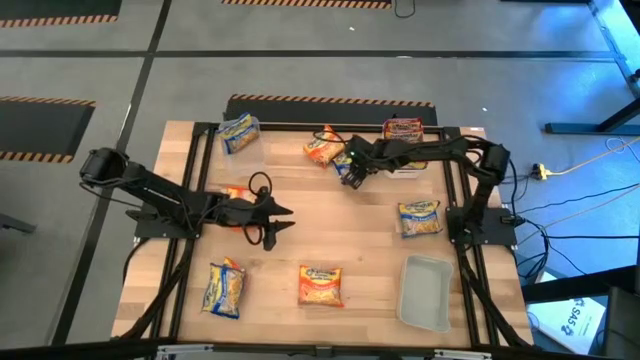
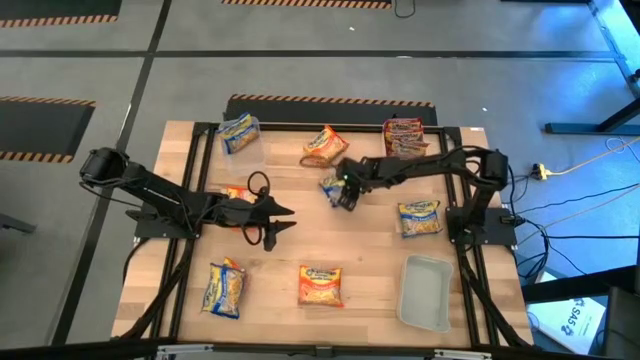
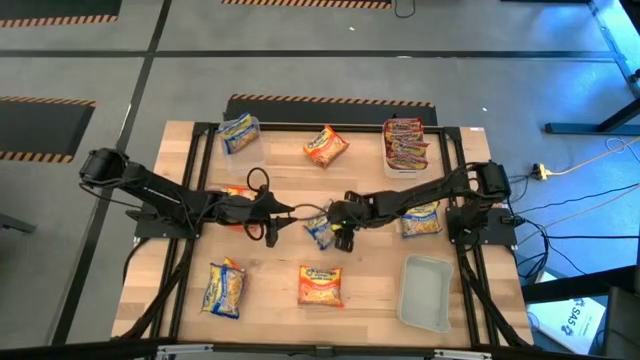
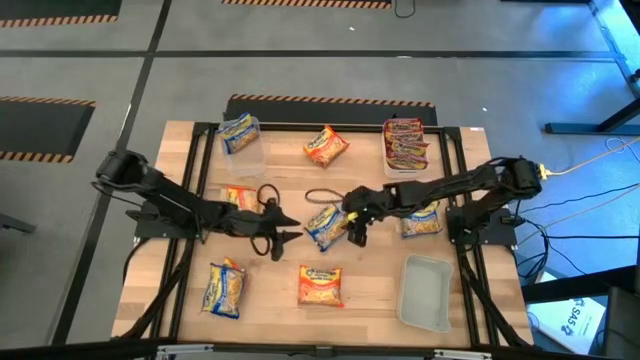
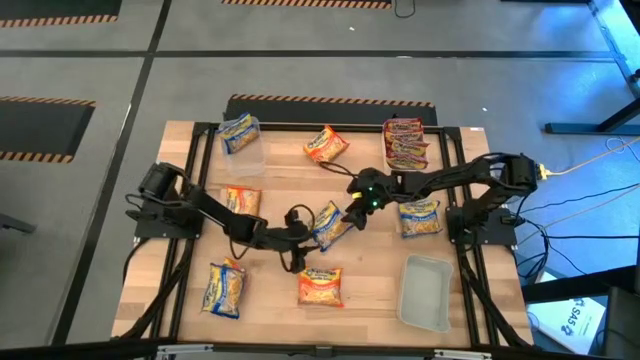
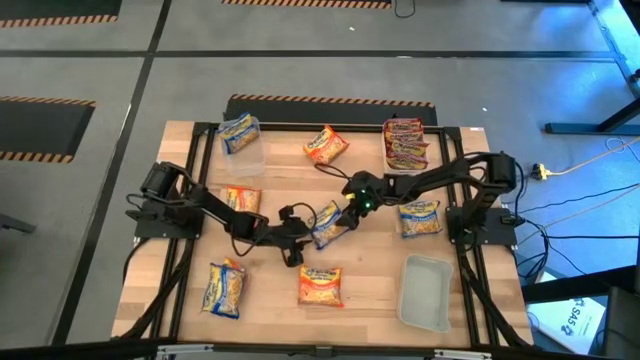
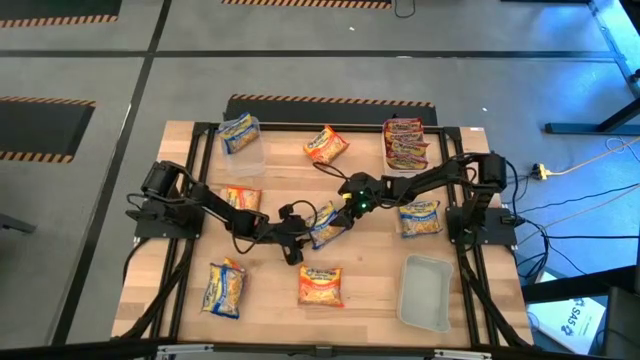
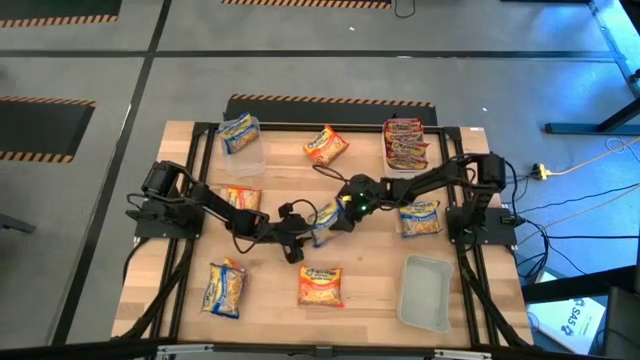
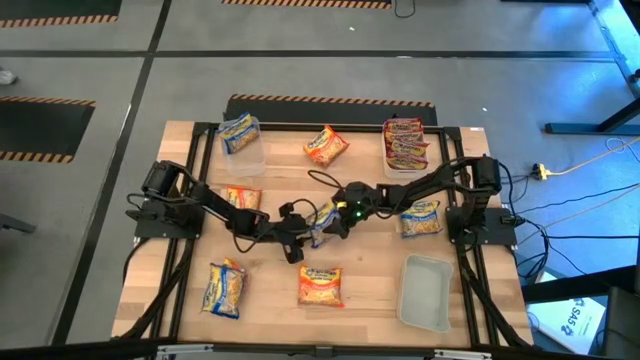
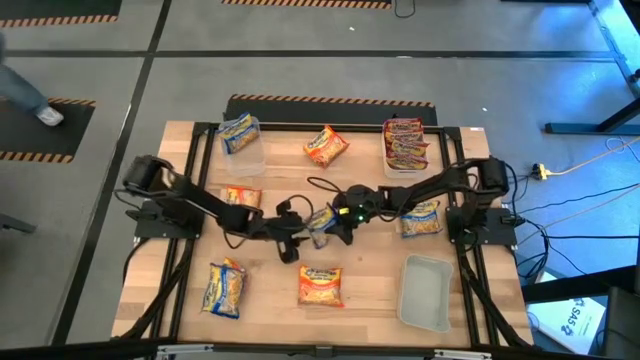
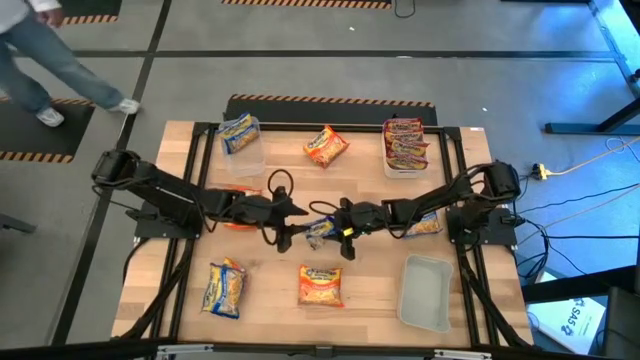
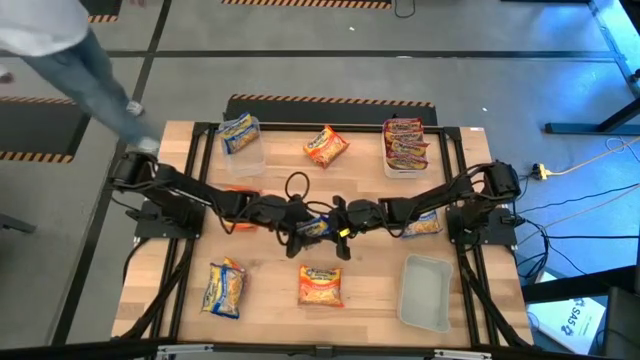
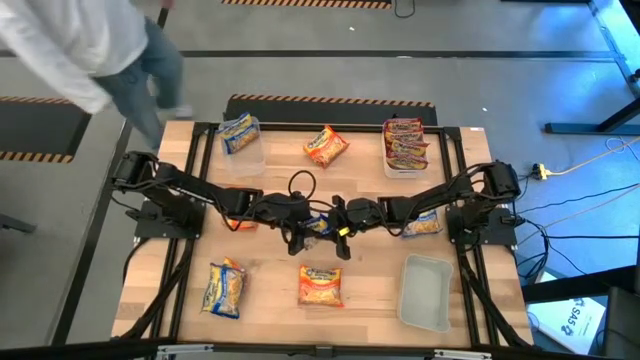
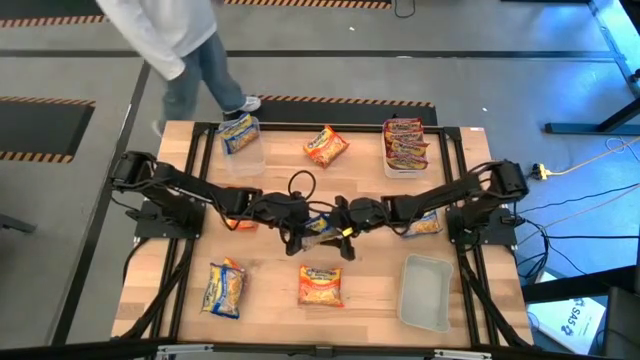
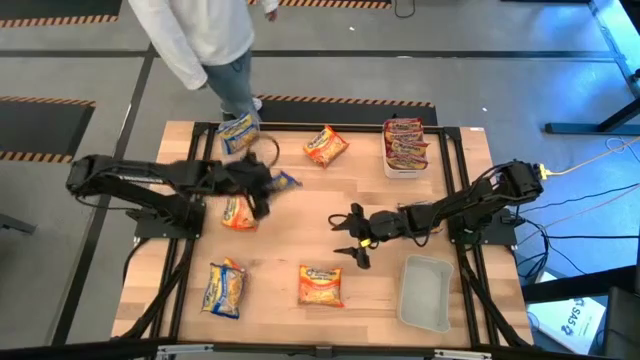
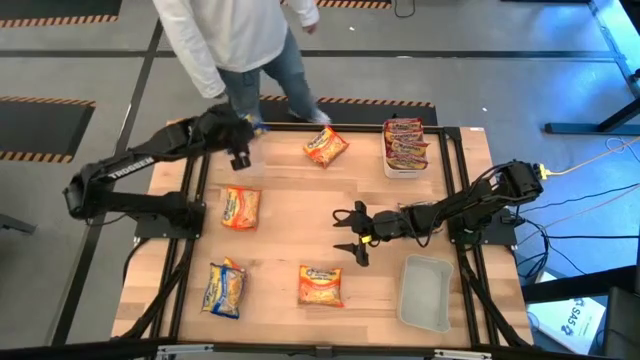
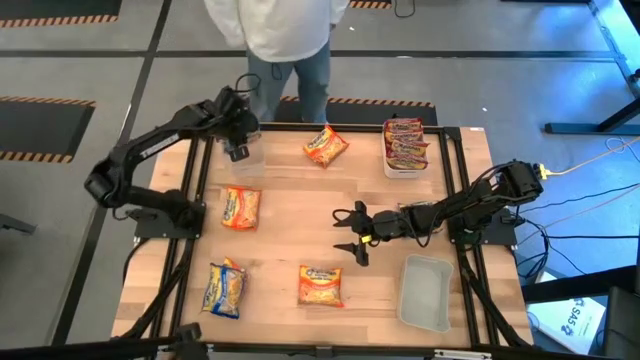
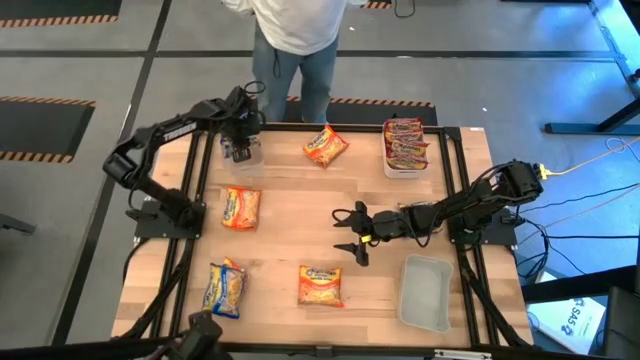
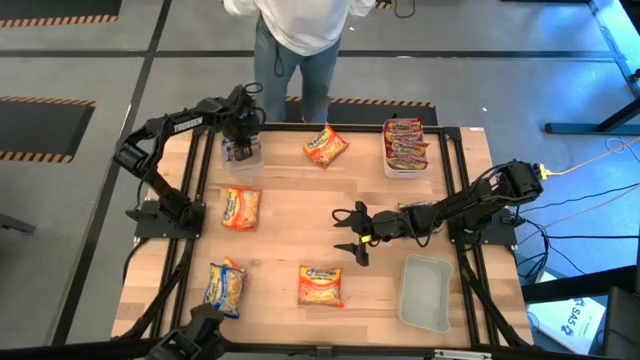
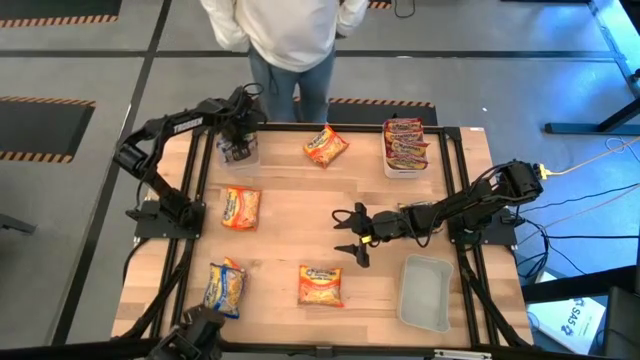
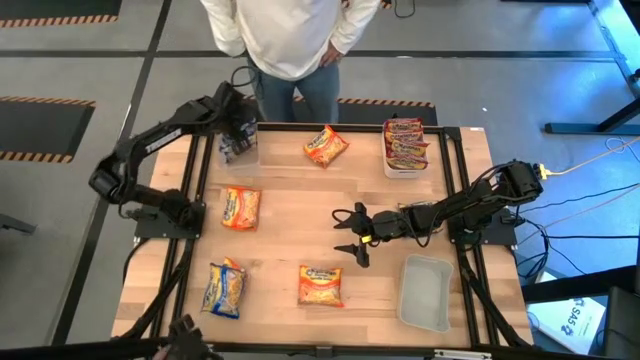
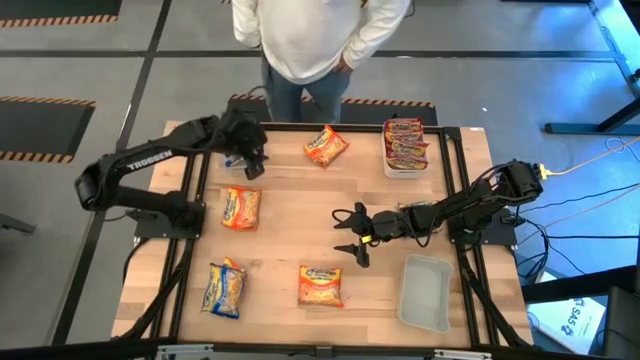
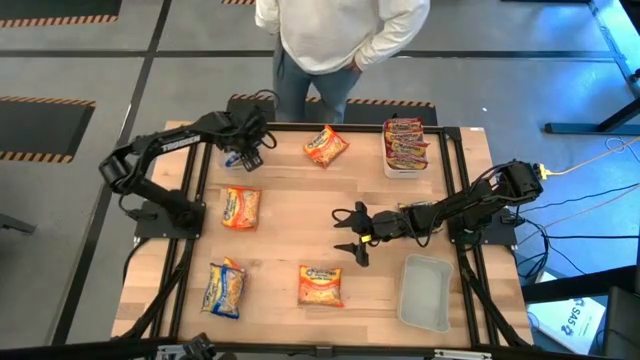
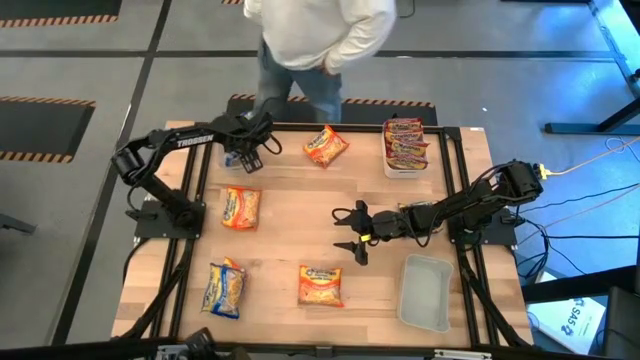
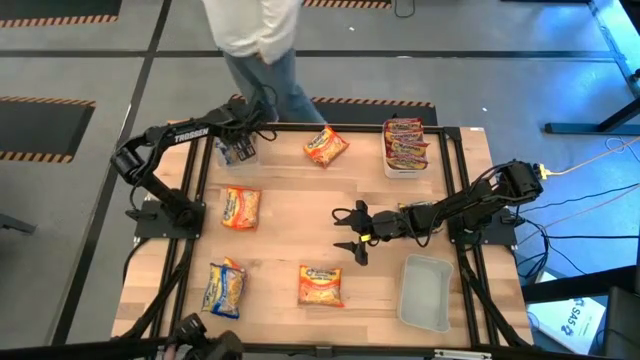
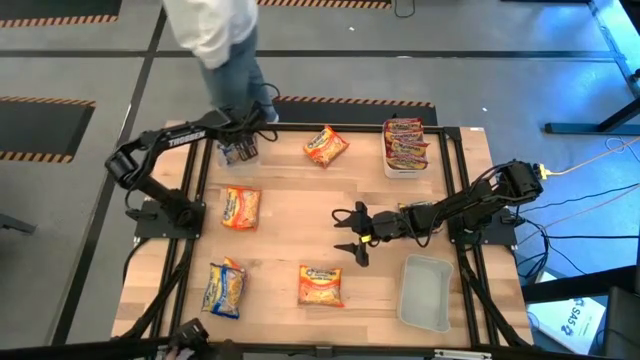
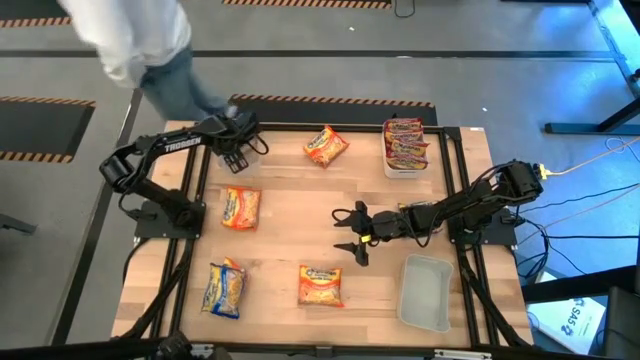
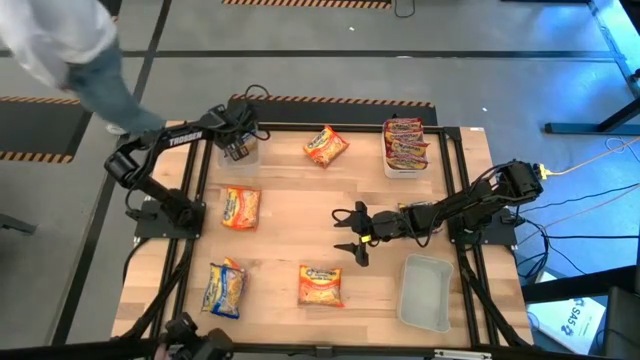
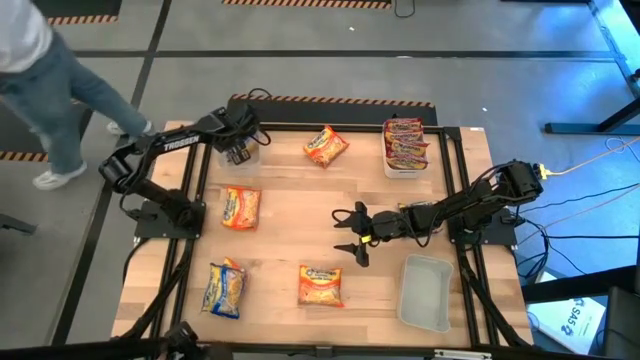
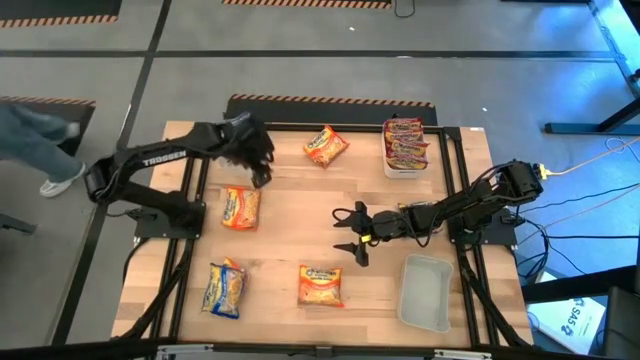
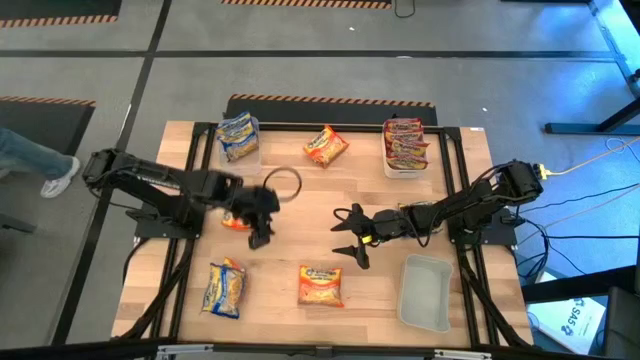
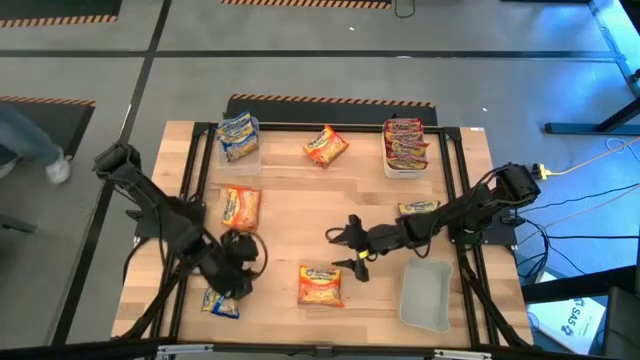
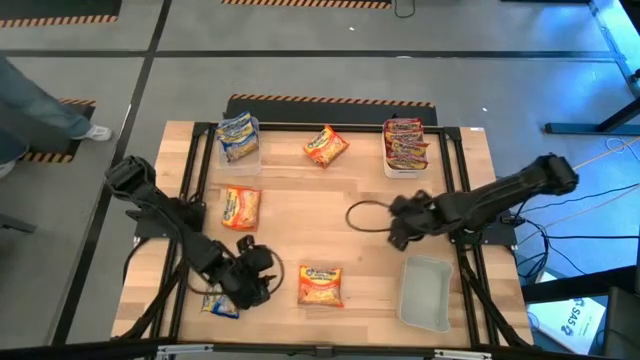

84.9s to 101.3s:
Task: Sort Maruchan noodles
Put the top blue noodle pack into the transparent bin

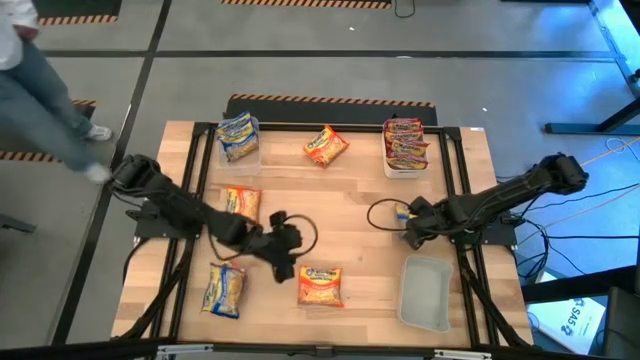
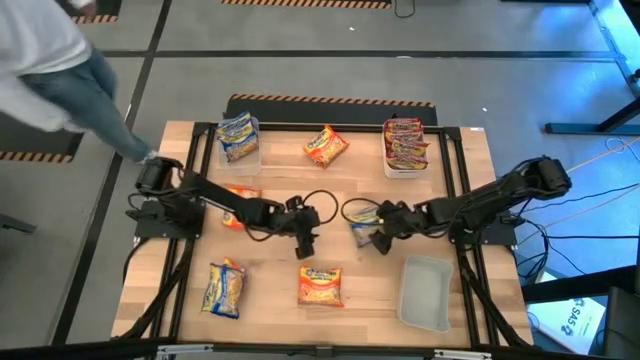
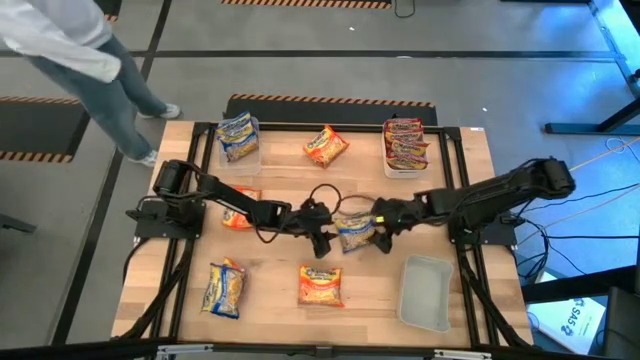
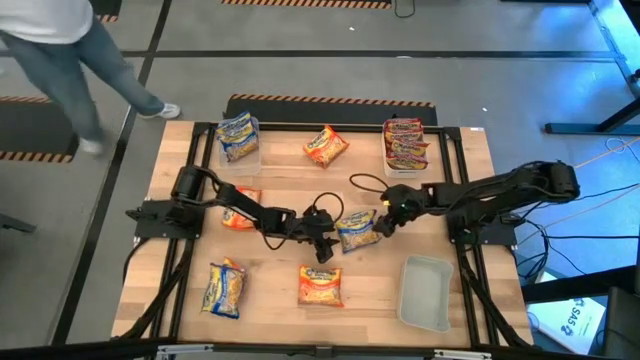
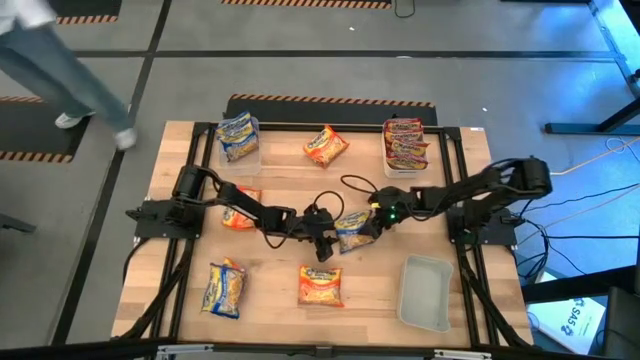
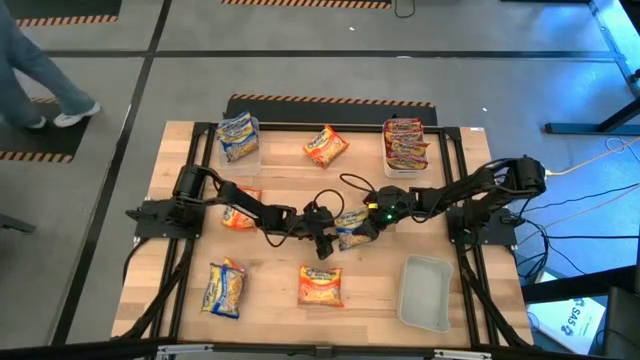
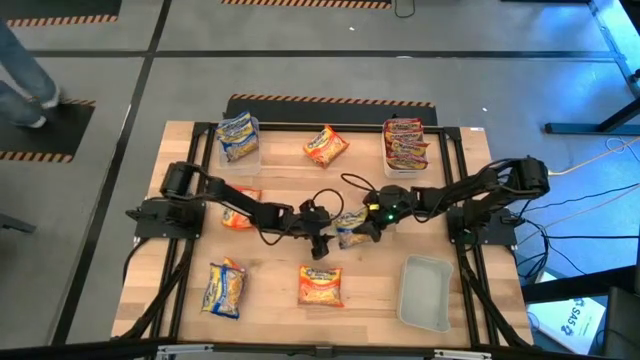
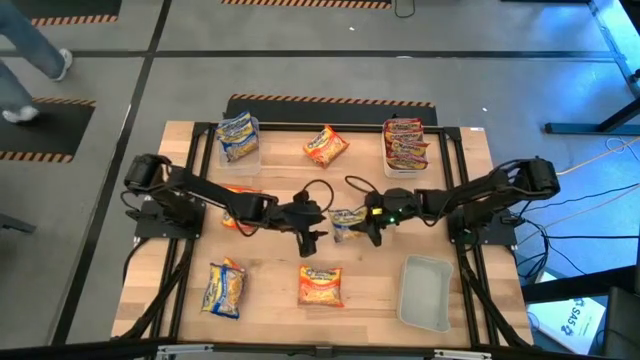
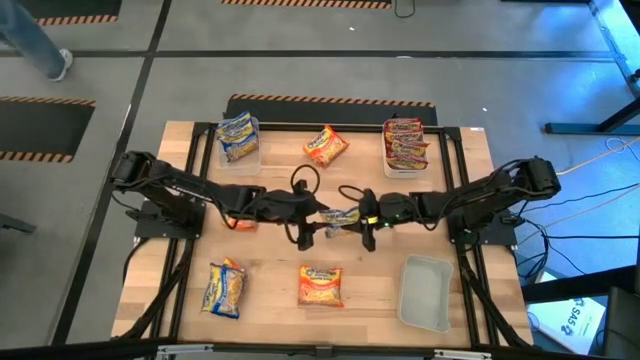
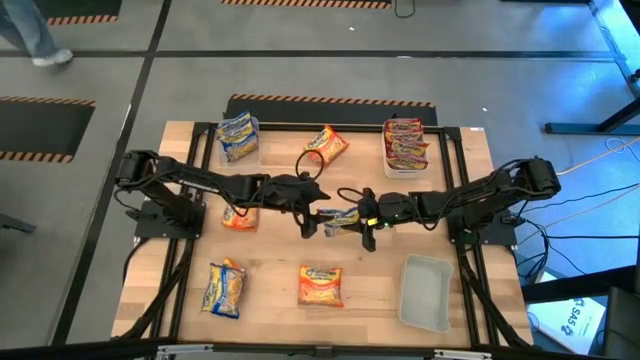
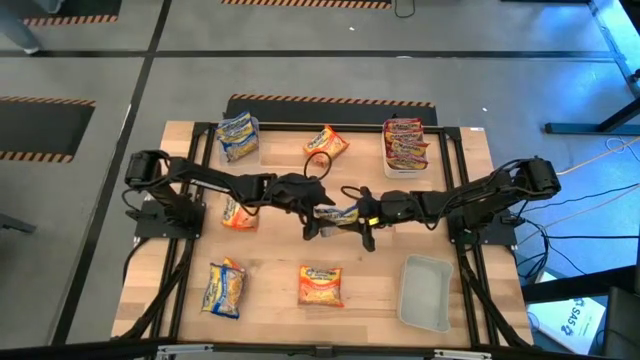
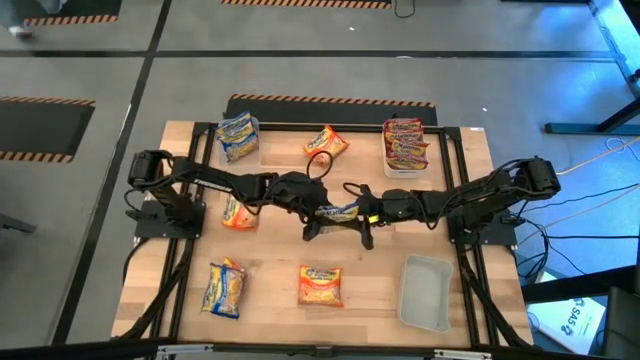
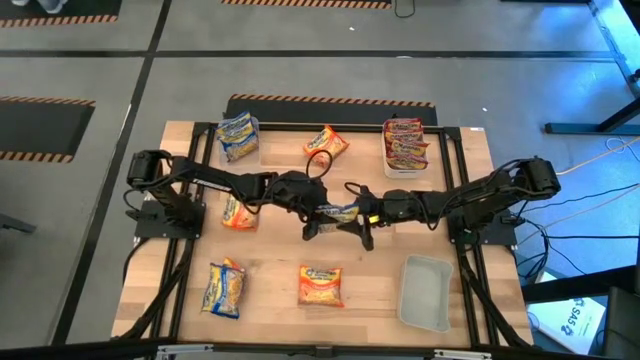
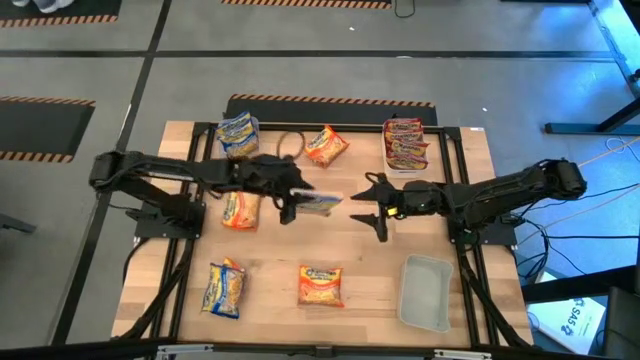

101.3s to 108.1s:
Put the top blue noodle pack into the transparent bin
